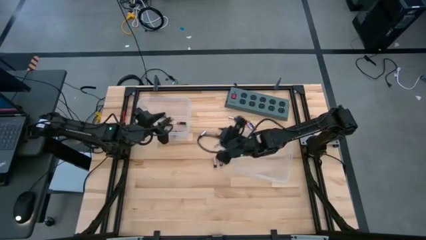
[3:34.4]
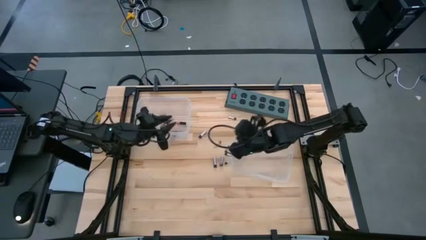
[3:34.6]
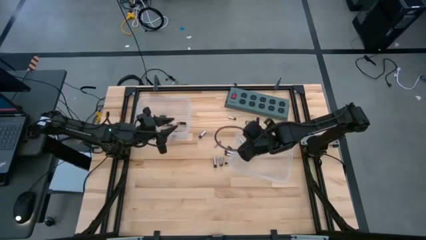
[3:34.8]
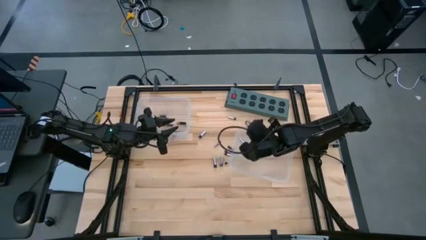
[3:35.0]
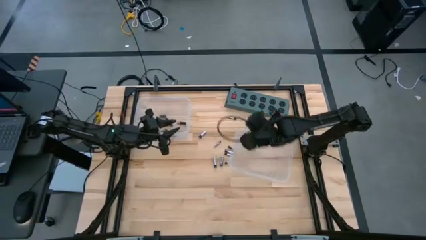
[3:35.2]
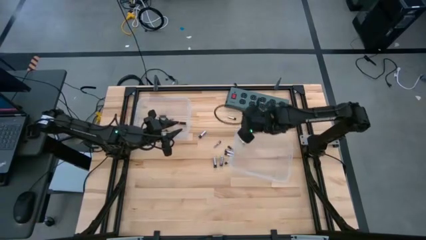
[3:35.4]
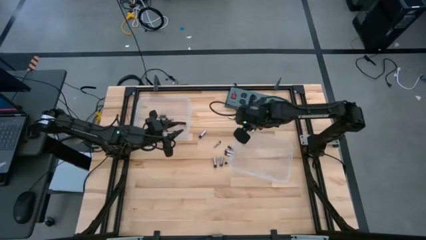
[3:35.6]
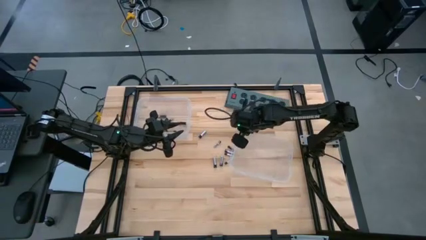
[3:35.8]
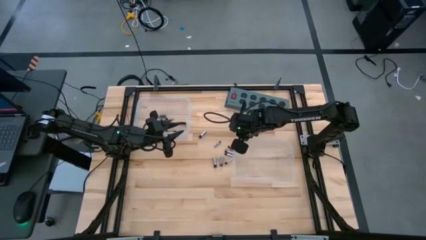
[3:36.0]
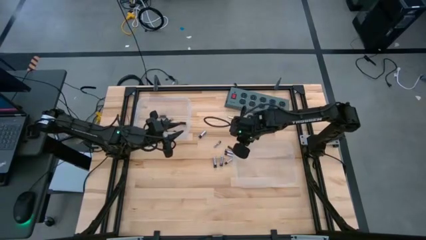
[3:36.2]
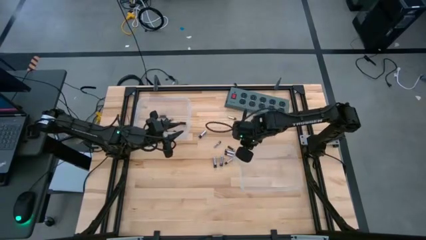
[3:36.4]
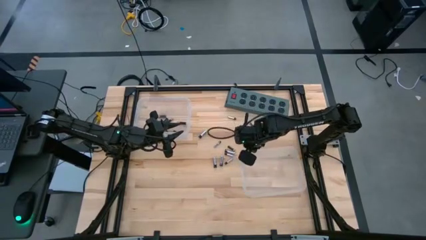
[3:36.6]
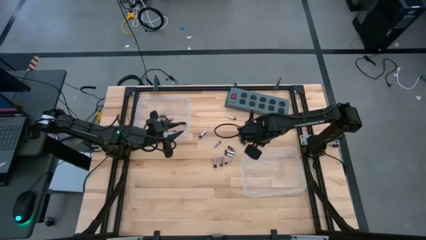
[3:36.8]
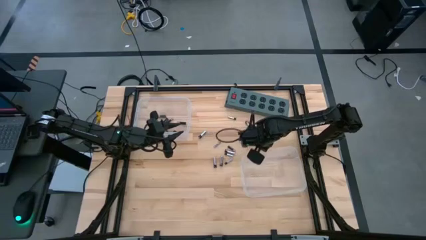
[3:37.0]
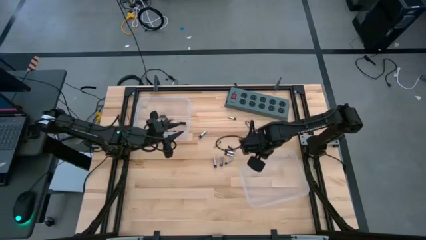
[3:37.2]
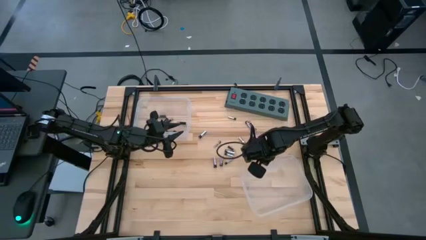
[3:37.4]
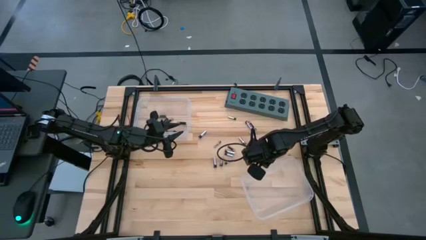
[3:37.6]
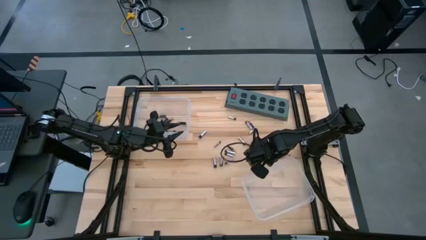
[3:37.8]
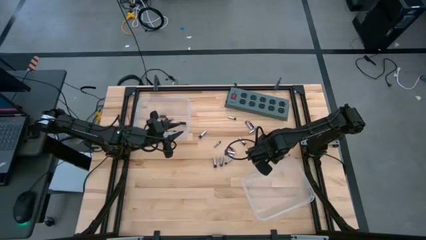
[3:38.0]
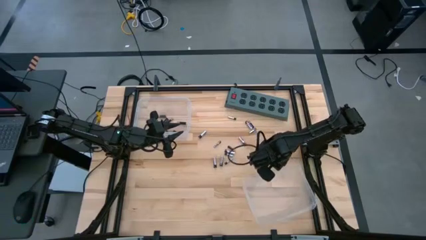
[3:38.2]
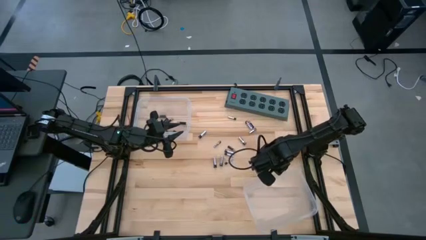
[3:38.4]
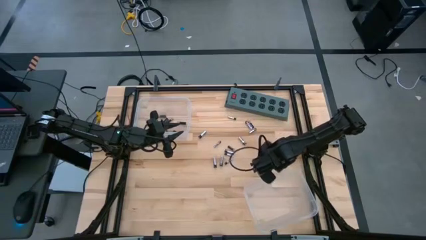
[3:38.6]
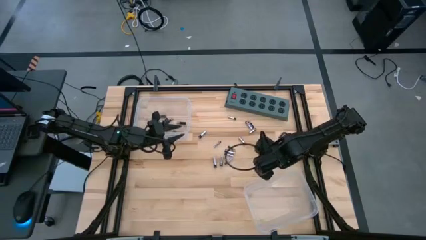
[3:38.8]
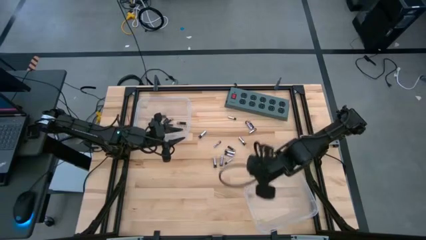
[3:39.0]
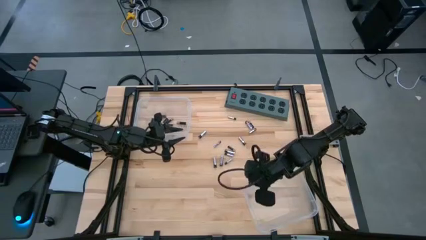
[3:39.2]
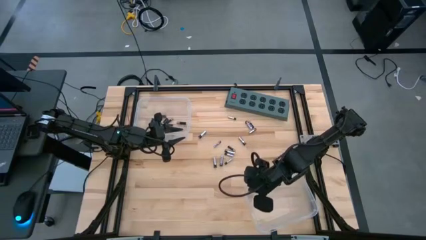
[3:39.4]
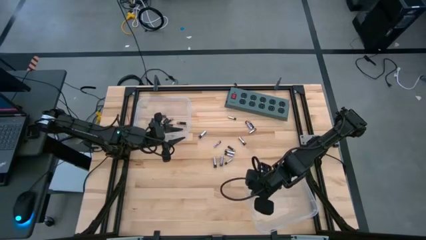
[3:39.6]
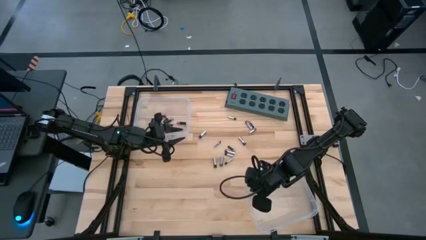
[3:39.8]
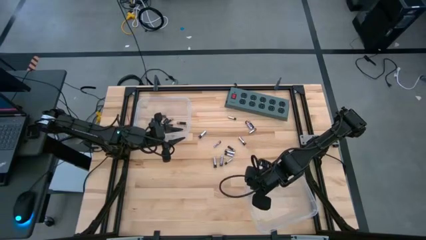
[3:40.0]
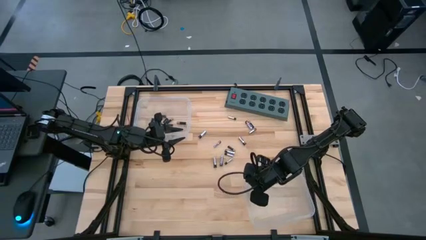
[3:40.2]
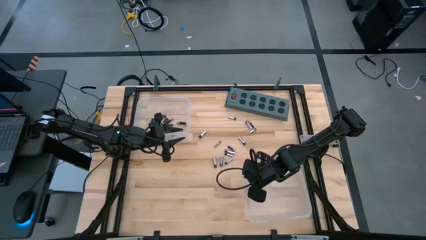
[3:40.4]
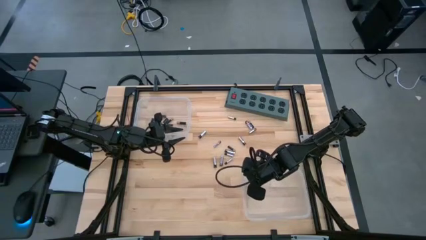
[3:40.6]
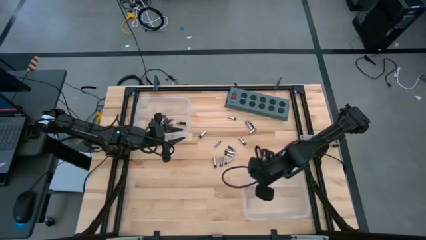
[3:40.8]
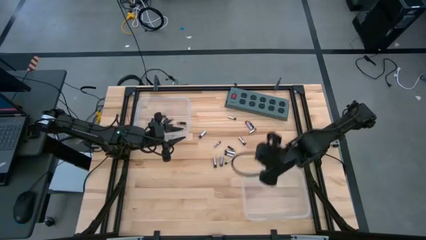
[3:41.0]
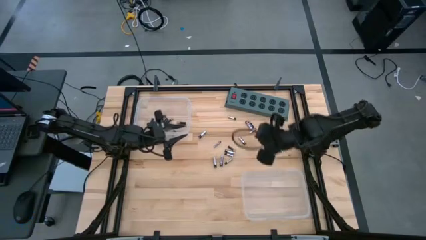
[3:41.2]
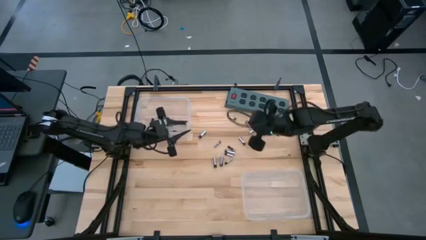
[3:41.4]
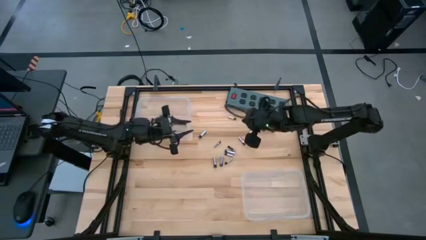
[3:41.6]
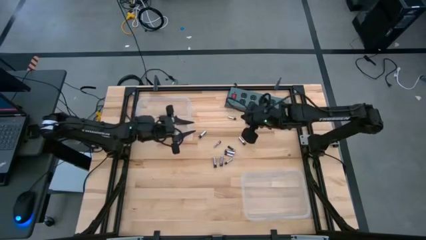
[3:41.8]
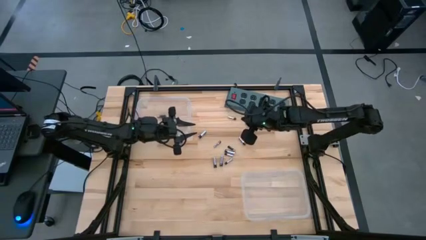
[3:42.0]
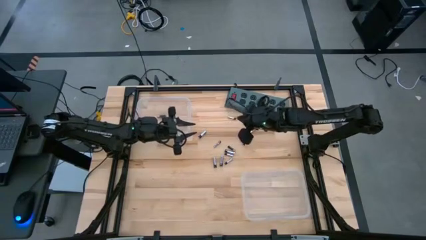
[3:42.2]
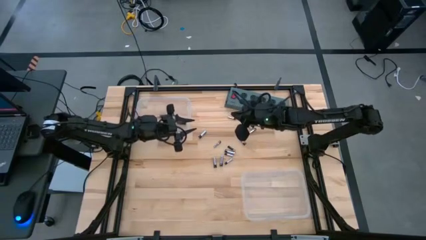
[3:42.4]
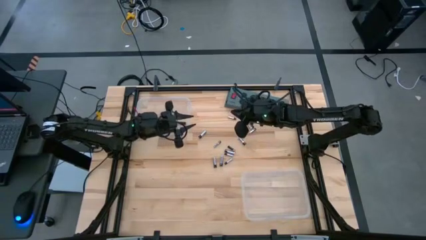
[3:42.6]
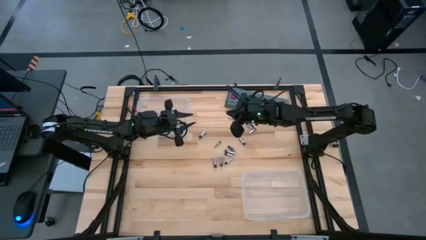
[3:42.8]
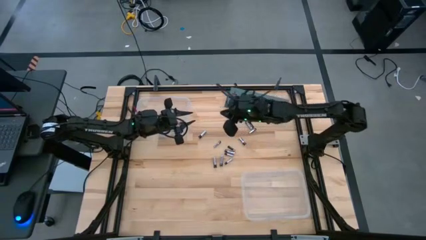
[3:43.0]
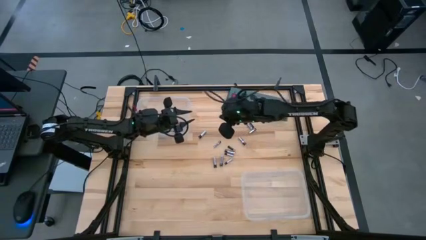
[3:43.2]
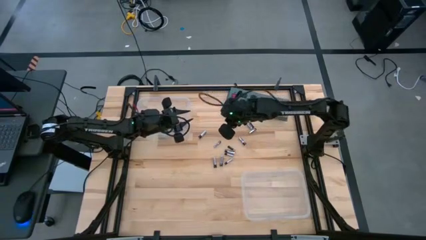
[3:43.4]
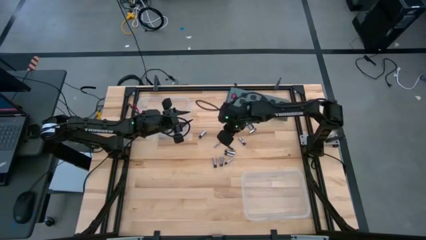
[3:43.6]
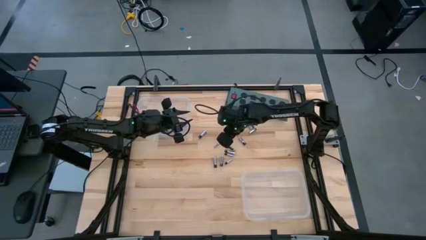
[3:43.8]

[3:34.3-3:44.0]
Task: Sort batteries
Put the black battery into the top transparent bin

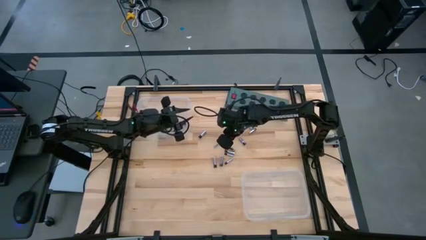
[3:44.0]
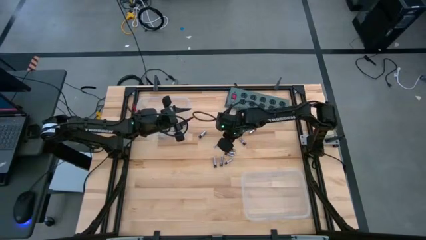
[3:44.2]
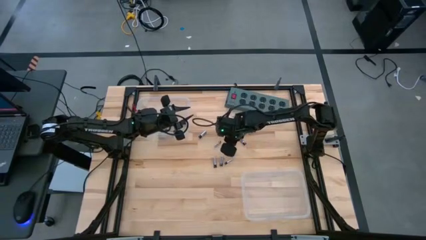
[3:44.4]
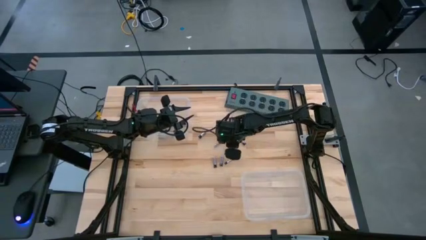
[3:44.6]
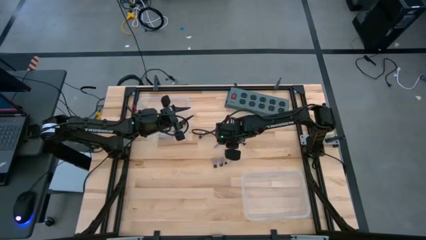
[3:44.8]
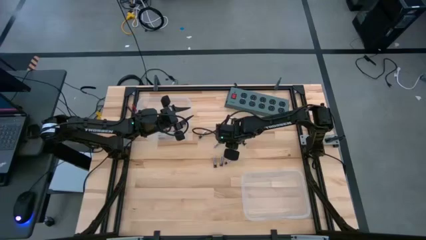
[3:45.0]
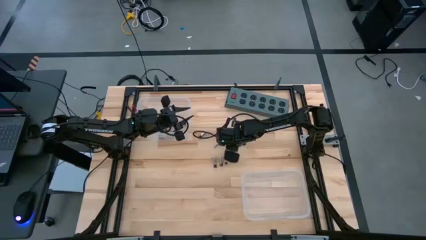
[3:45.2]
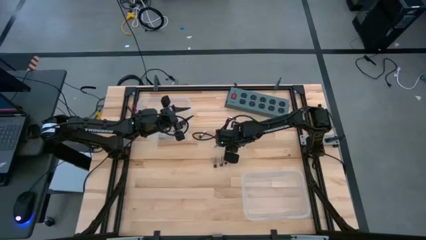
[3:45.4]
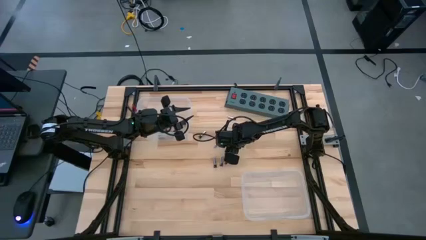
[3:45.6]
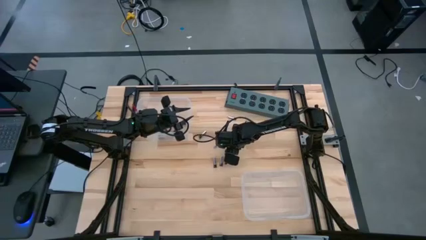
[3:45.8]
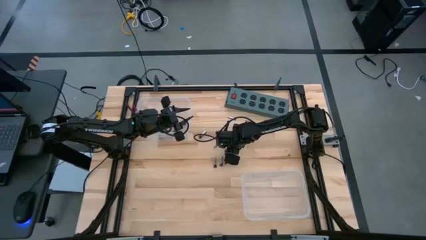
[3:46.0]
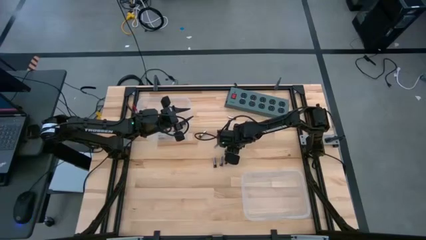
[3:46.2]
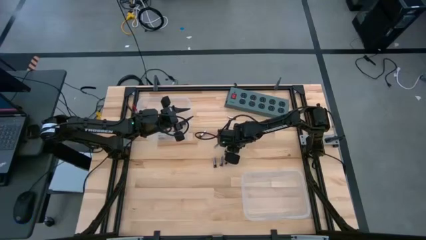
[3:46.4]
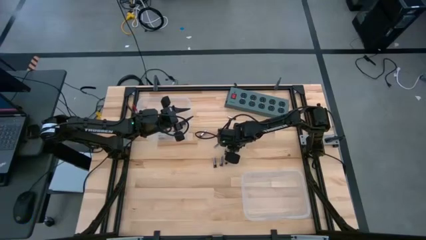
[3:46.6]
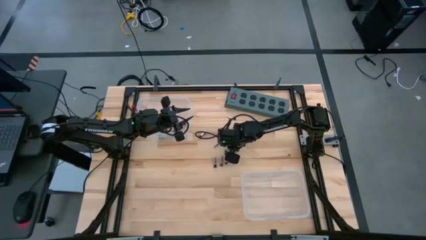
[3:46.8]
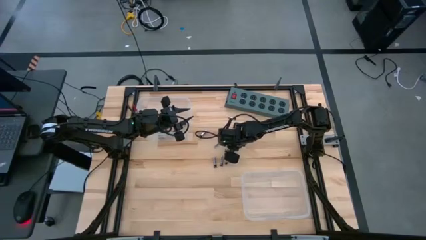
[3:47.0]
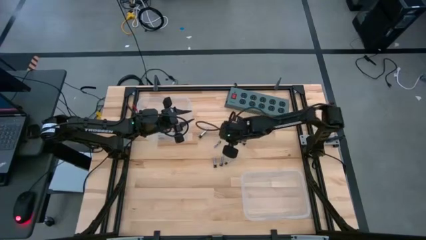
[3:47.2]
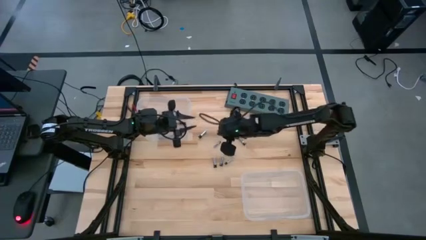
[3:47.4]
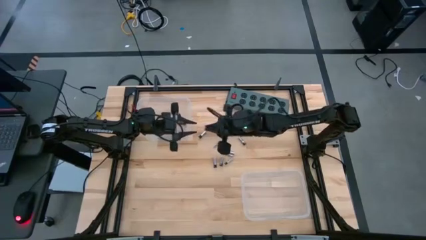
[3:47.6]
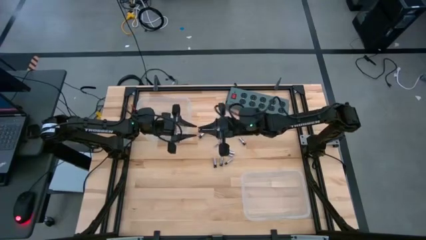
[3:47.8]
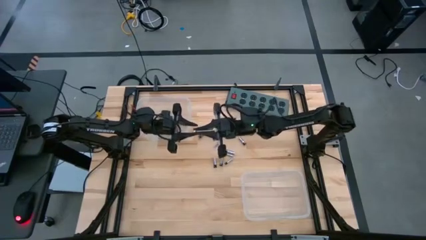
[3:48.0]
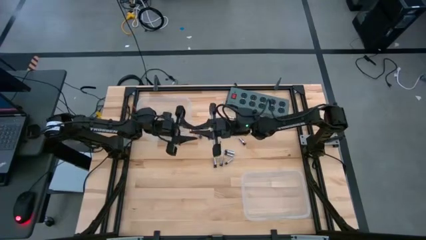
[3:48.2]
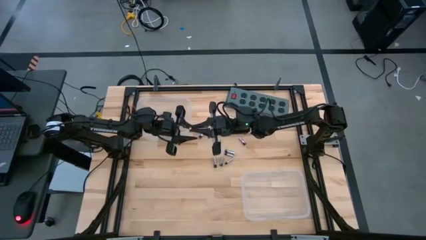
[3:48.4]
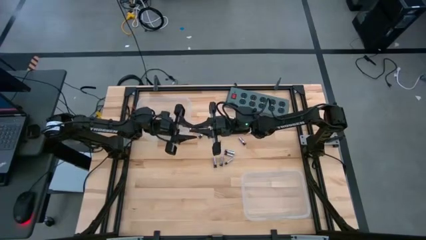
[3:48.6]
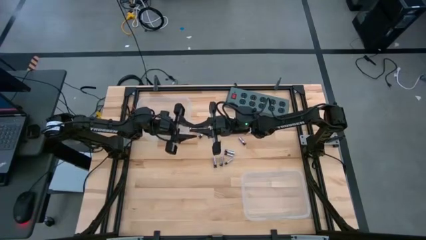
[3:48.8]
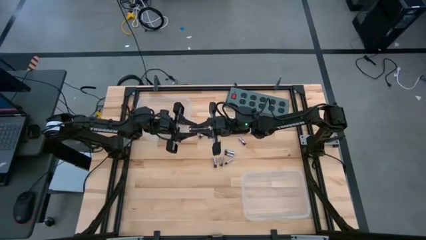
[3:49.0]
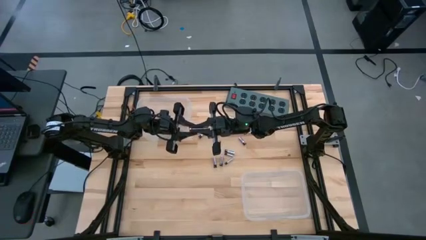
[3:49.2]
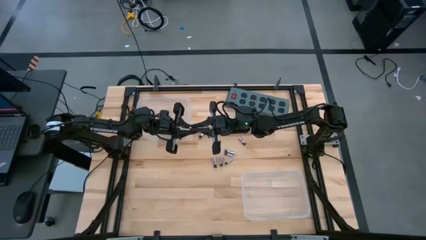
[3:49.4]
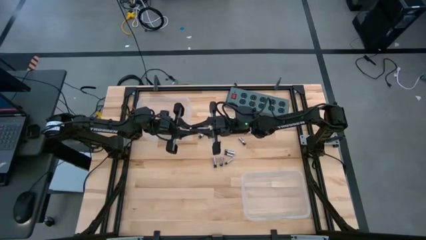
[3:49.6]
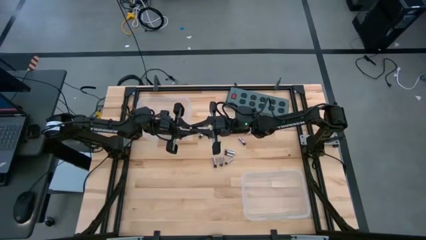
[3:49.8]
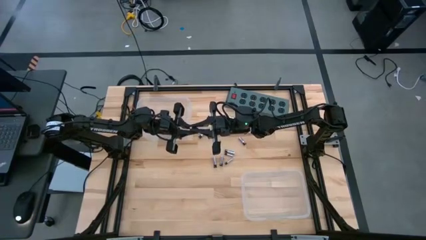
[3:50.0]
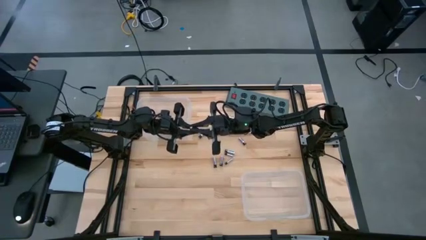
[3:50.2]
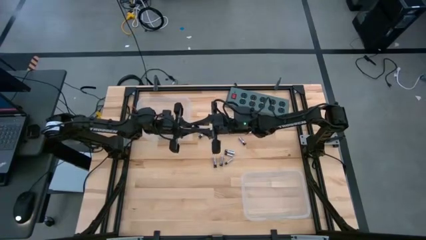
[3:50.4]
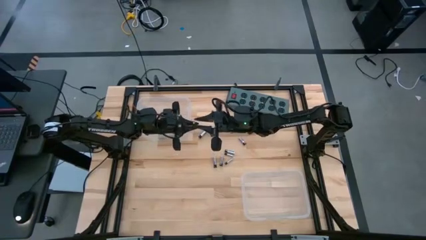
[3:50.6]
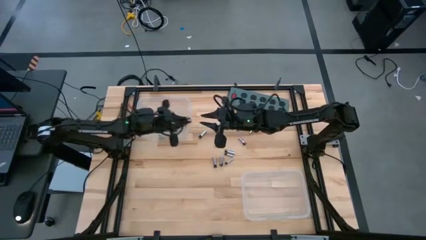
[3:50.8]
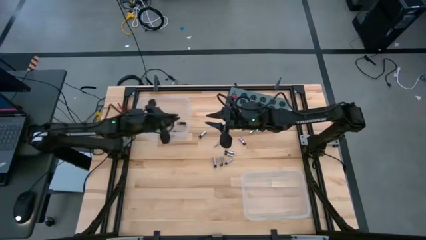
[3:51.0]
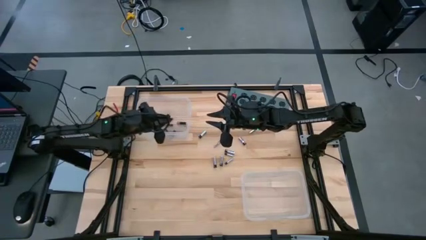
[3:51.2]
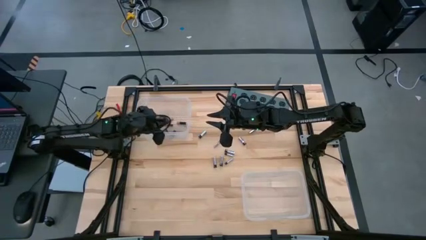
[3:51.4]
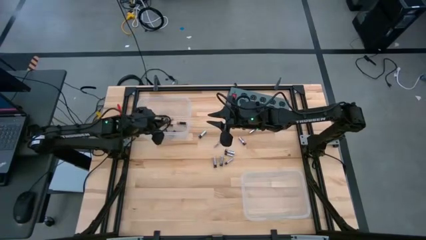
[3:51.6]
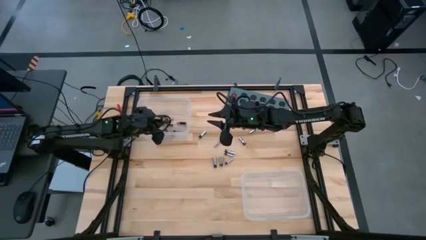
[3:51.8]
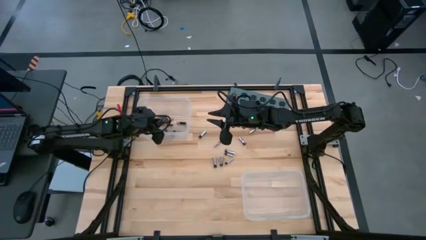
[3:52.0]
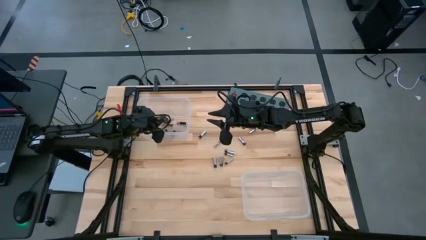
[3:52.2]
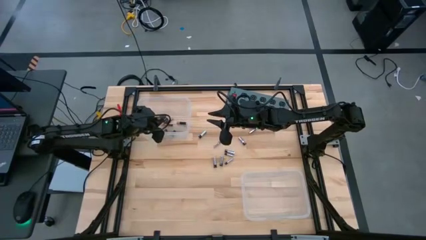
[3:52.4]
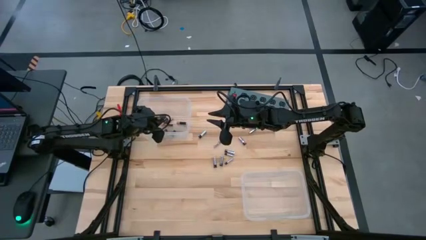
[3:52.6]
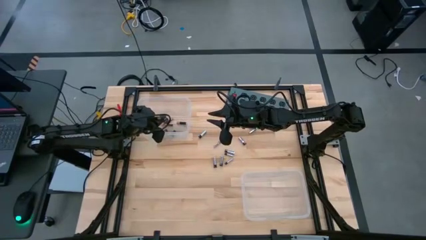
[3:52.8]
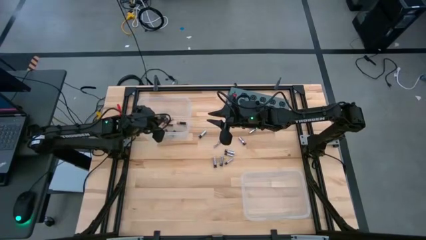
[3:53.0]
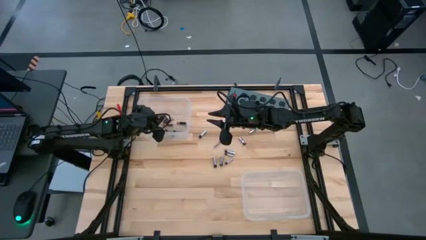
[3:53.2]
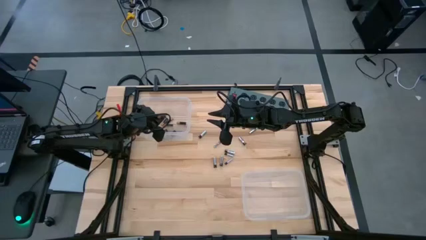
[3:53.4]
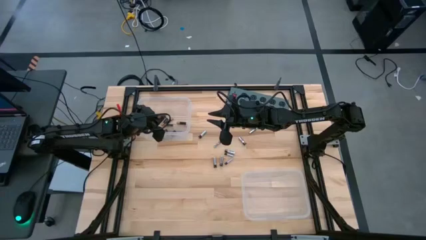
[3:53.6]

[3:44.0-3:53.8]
Put the black battery into the top transparent bin
